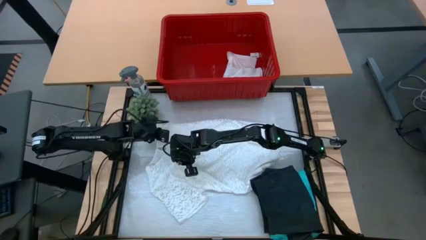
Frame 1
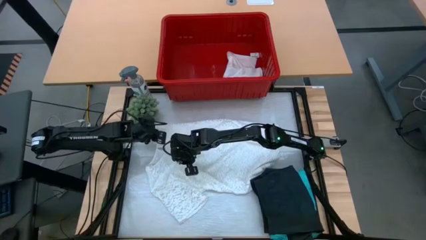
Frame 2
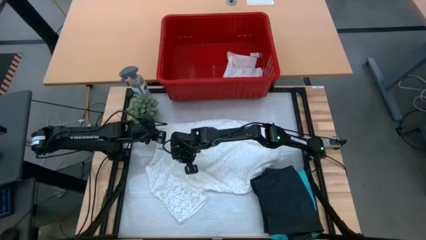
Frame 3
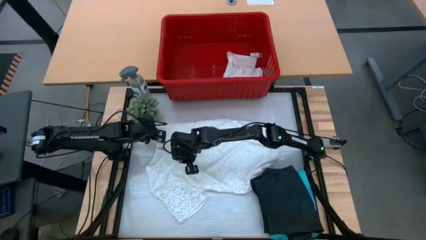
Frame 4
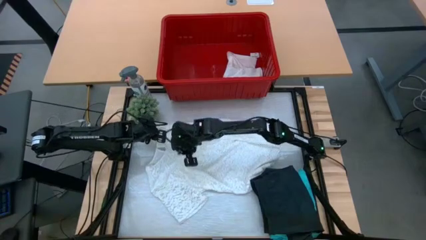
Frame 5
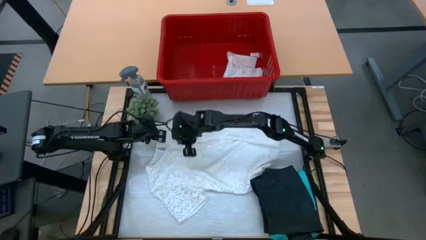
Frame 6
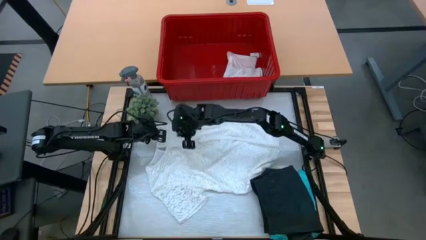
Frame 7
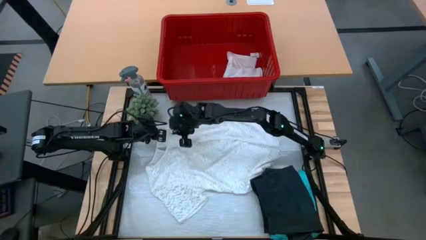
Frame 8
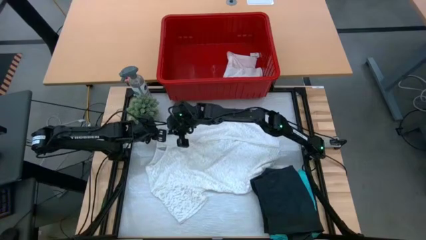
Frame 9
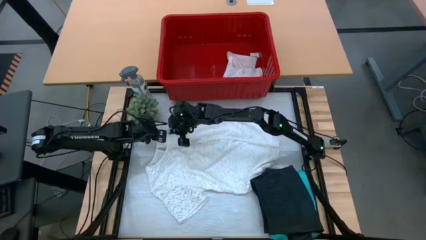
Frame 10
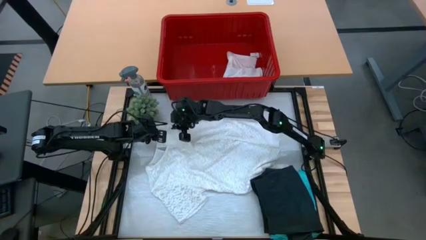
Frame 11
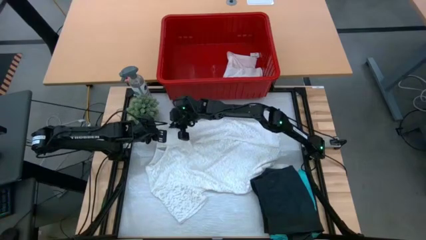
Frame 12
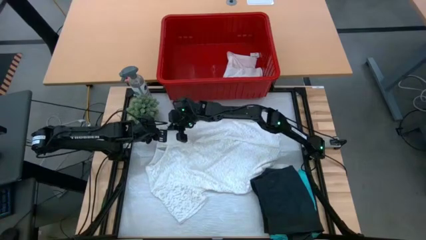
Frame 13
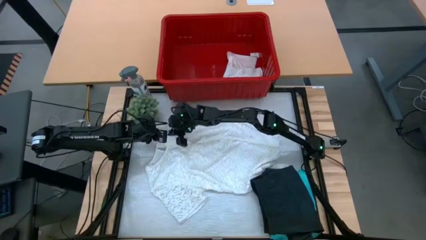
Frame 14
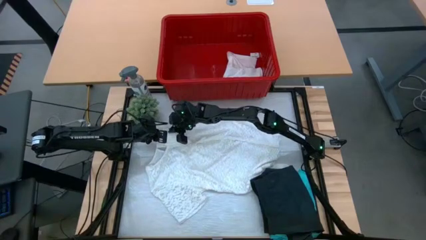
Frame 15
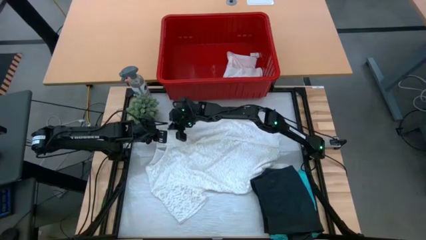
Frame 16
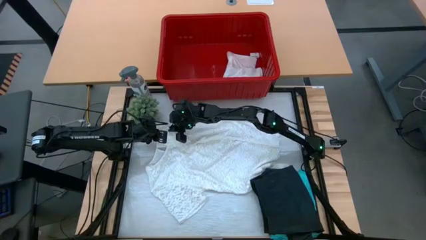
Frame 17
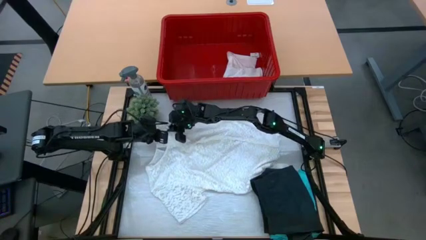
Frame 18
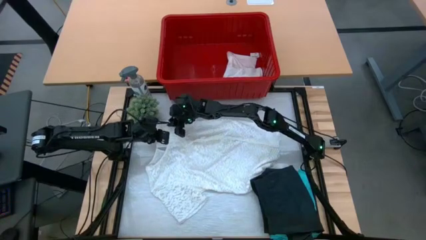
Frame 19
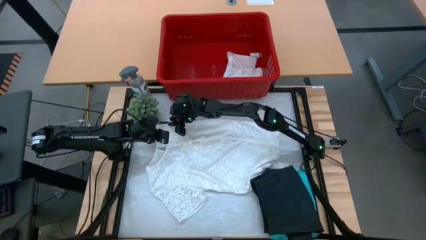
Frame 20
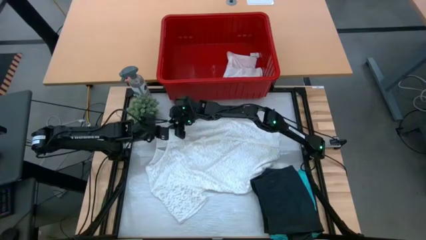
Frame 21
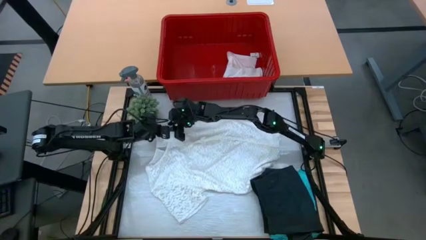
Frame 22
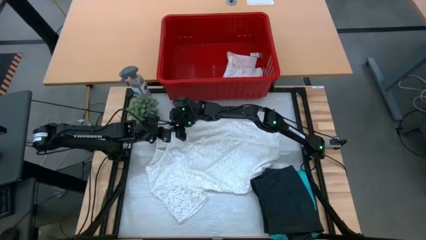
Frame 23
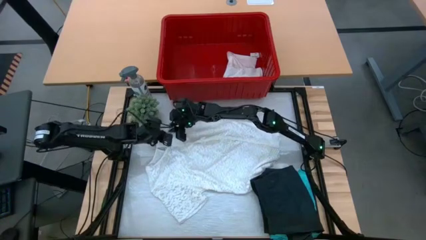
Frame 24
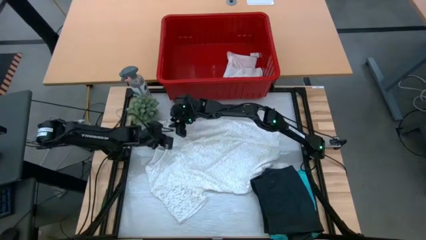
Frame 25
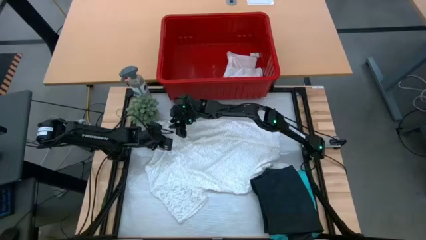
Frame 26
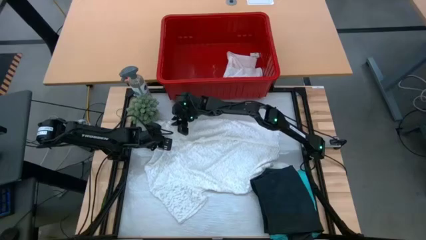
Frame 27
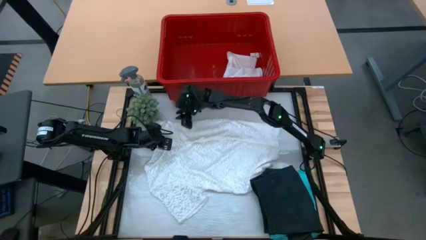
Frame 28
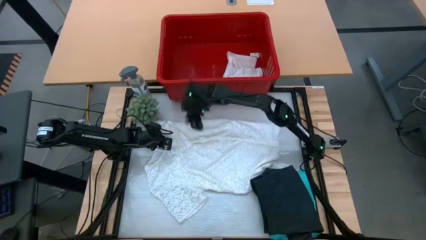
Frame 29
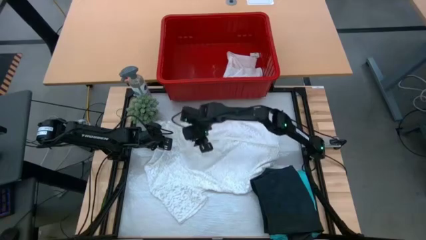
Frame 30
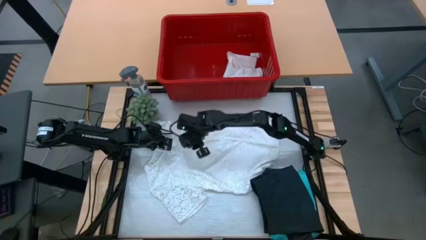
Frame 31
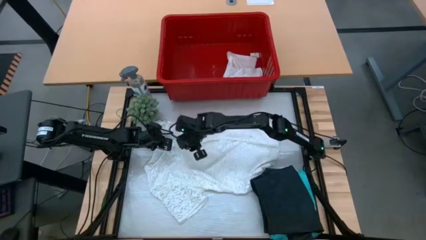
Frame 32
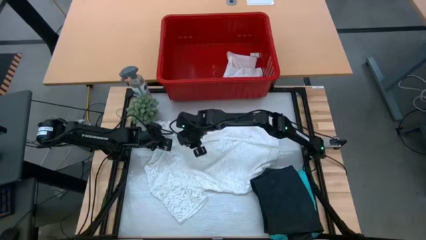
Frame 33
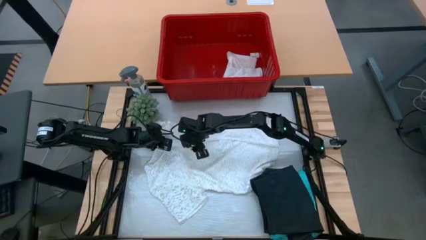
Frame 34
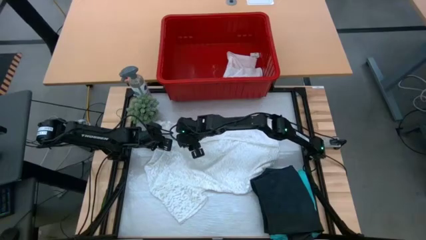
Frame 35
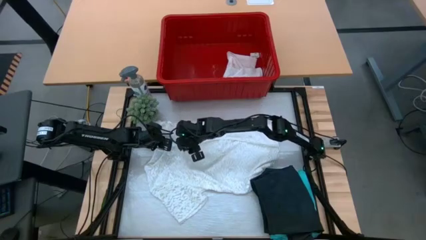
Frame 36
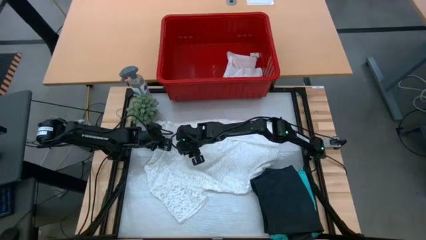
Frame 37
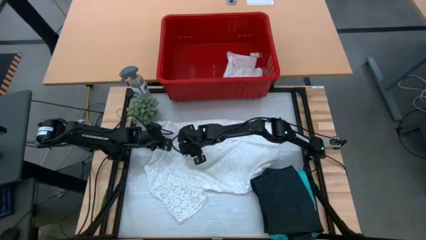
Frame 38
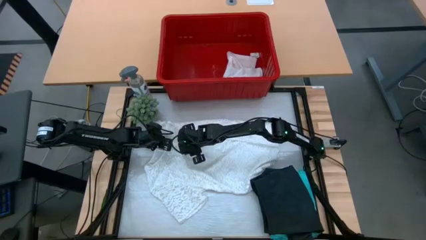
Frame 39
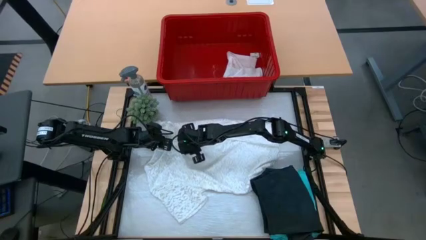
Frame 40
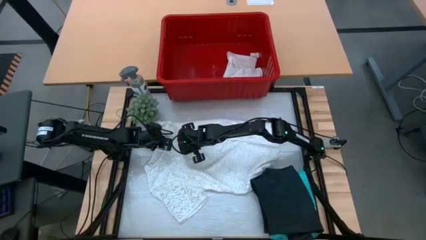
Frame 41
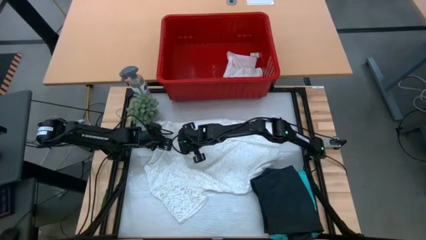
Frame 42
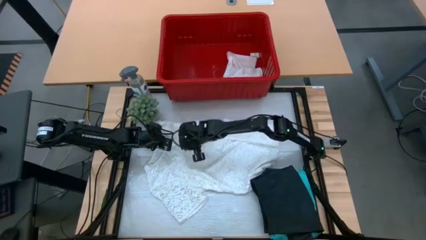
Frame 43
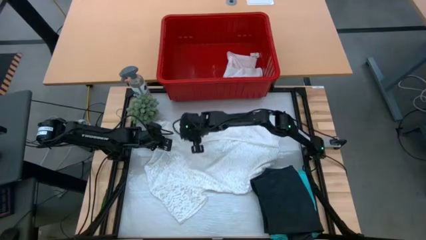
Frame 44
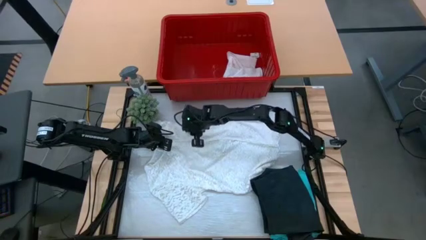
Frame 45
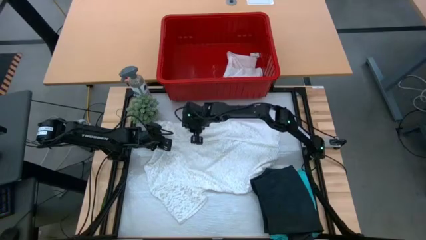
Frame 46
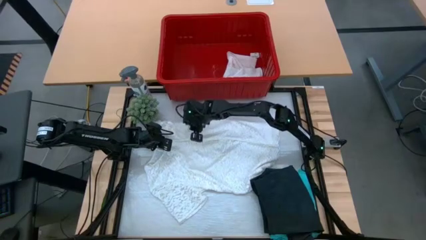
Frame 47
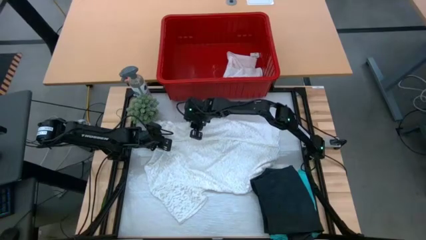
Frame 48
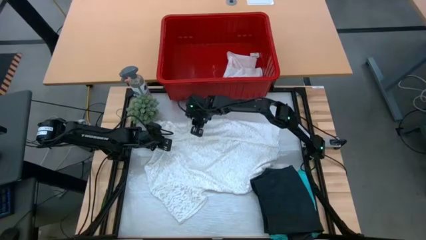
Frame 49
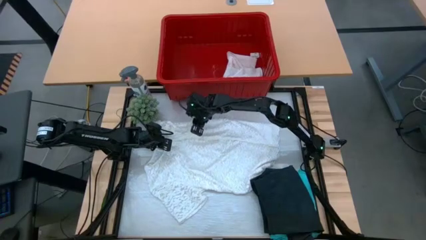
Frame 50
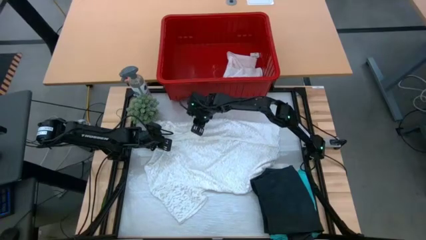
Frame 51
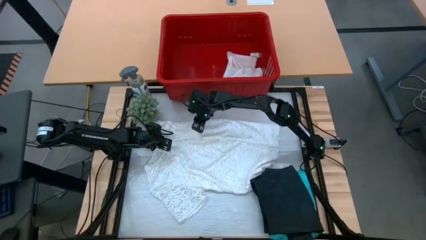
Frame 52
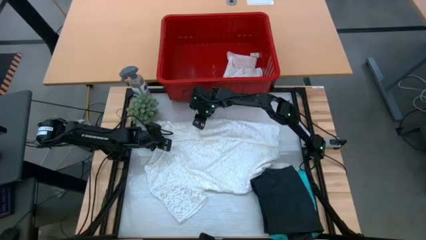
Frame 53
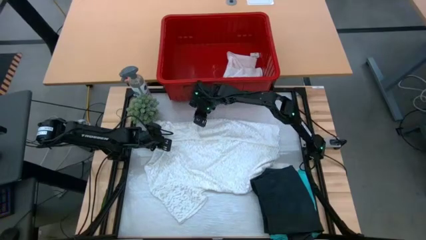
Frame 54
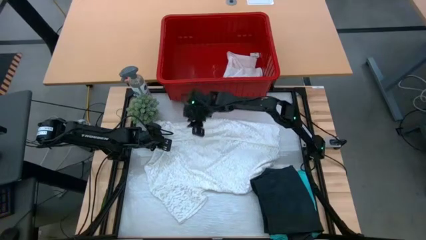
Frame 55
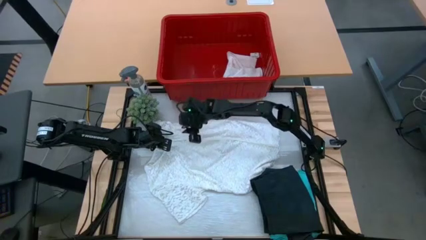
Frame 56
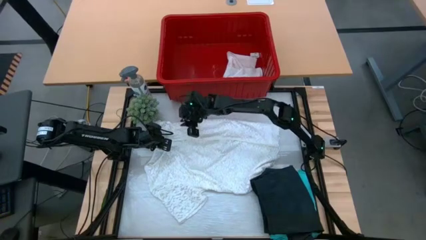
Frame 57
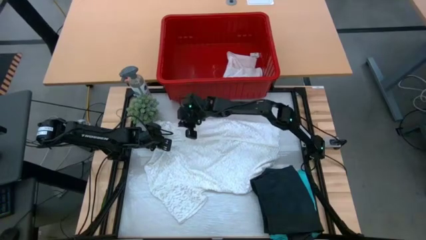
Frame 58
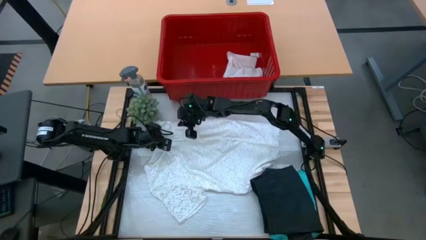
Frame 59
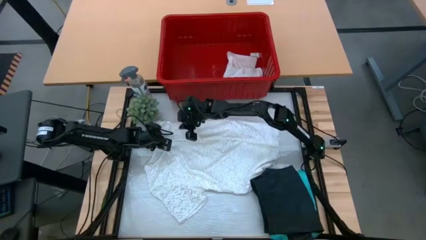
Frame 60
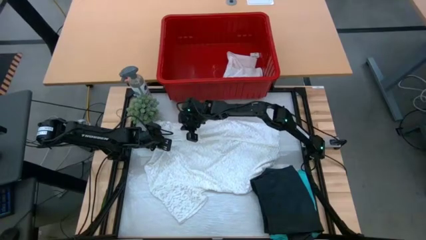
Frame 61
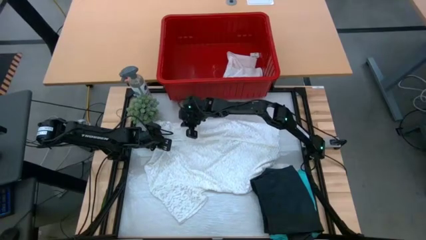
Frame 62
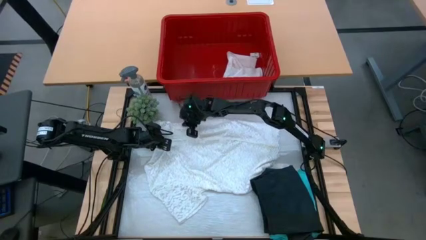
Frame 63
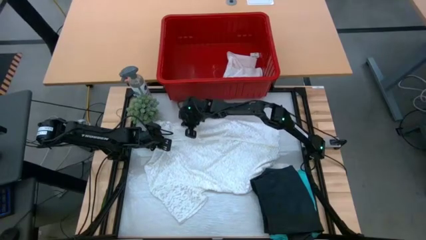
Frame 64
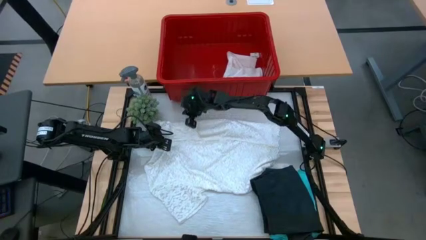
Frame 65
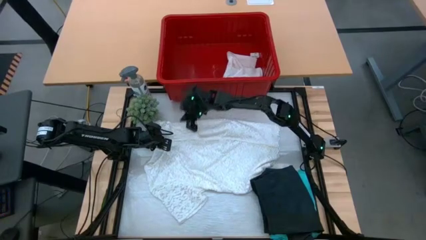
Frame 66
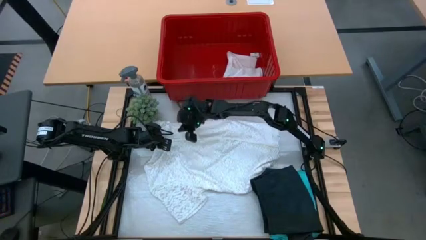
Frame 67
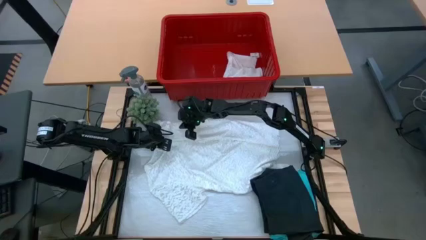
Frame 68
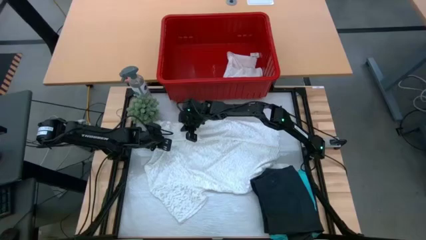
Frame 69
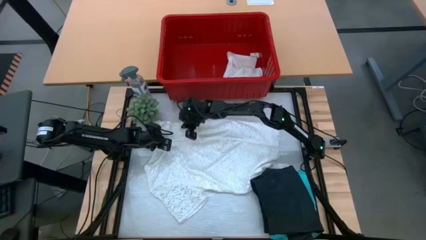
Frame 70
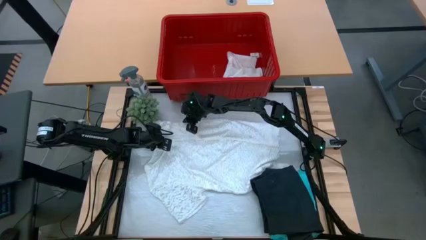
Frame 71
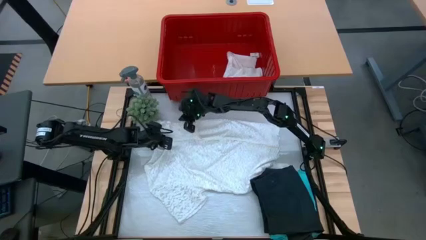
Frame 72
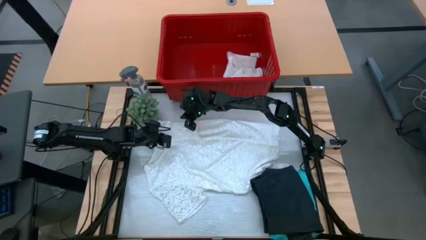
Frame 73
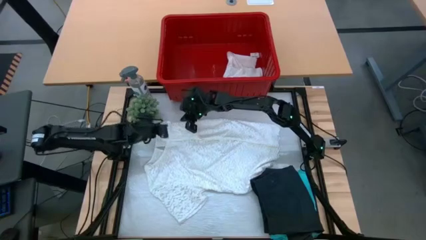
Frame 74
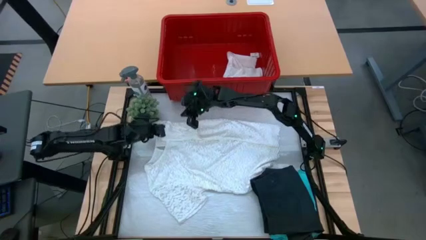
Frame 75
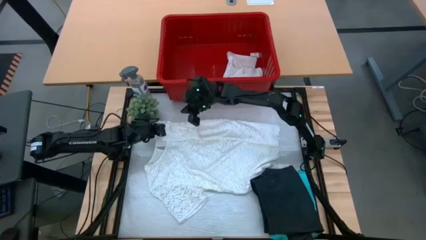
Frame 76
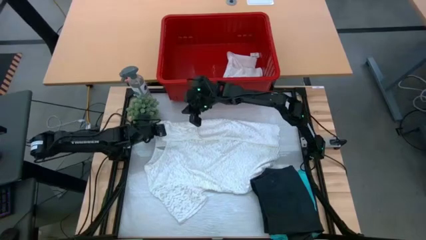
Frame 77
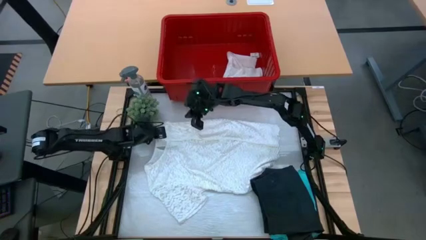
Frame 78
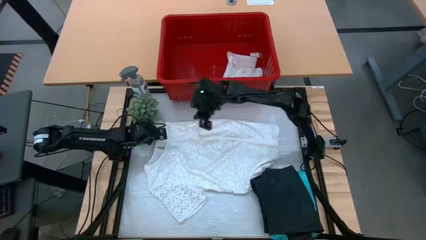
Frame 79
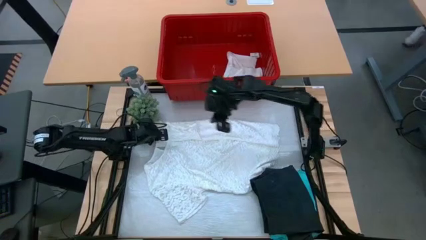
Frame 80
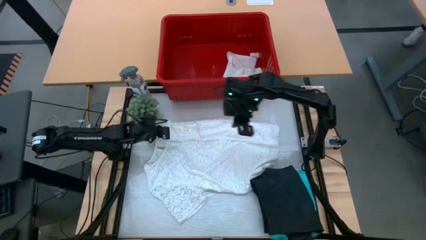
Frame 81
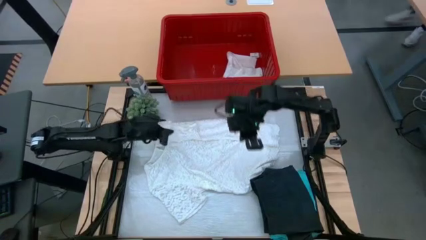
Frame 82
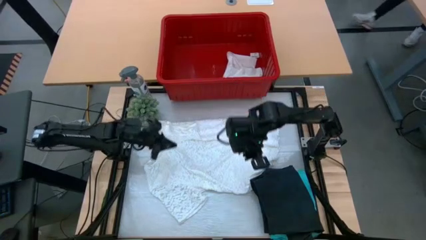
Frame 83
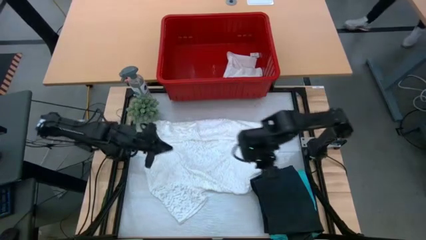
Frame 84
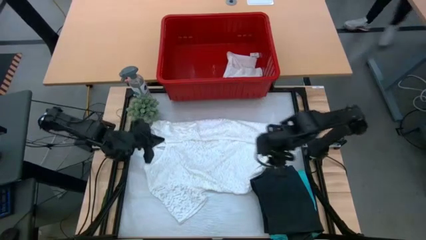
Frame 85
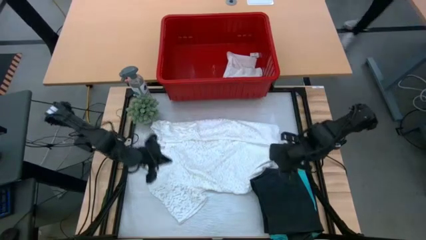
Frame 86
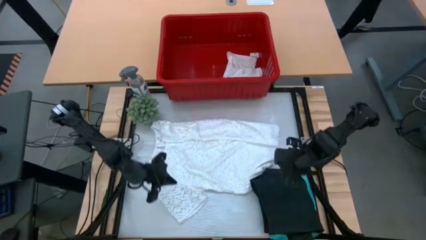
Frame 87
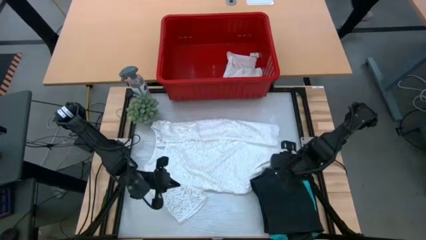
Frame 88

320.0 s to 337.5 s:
Task: Fold Laundry from Bin
Fold the white t-shirt
